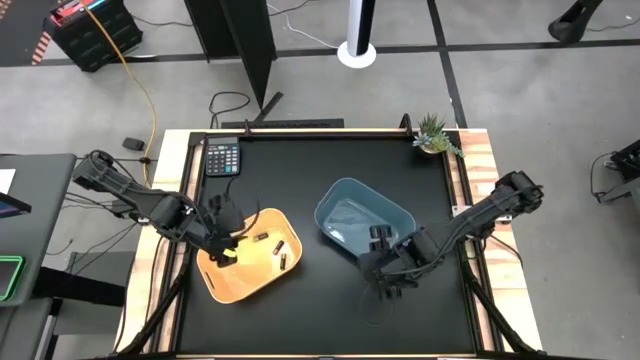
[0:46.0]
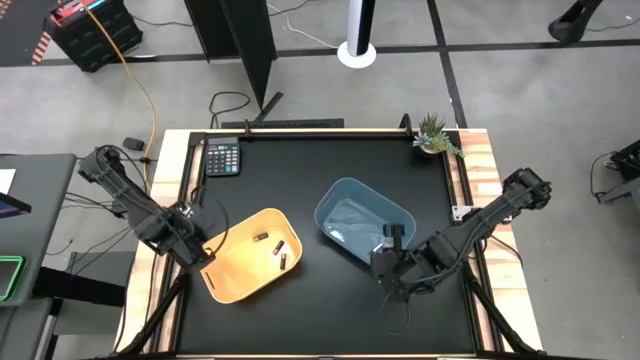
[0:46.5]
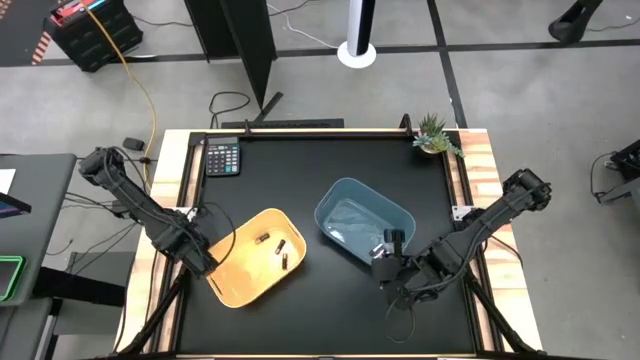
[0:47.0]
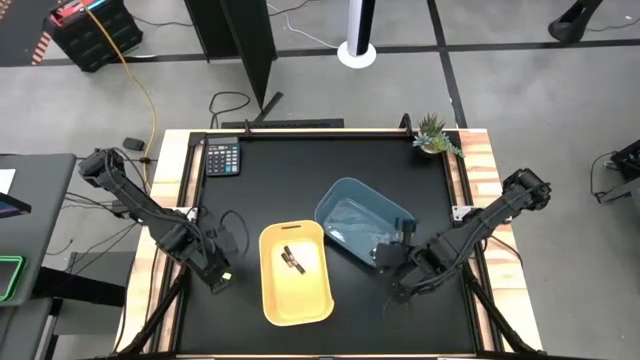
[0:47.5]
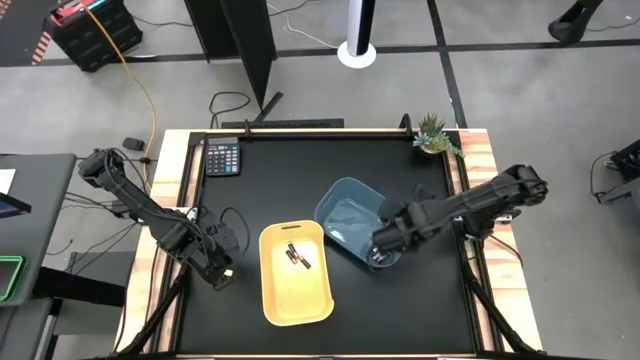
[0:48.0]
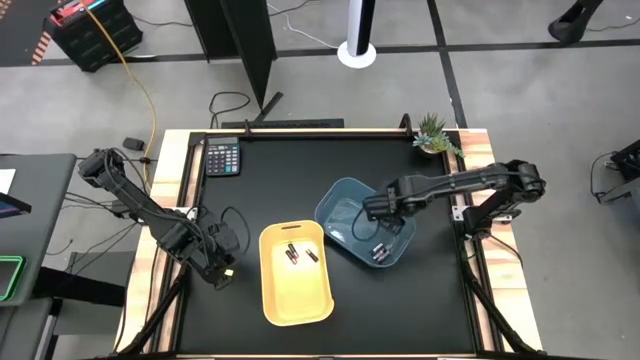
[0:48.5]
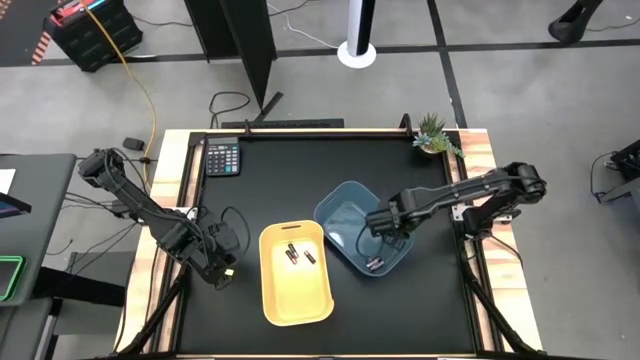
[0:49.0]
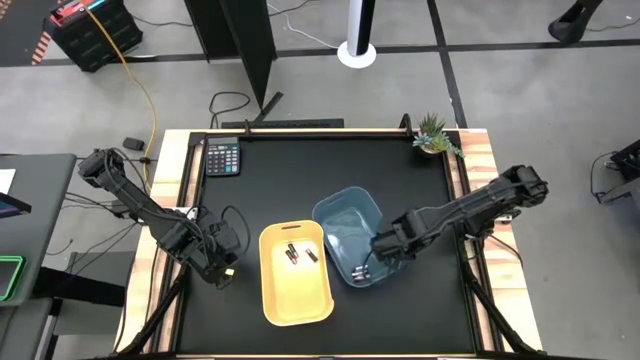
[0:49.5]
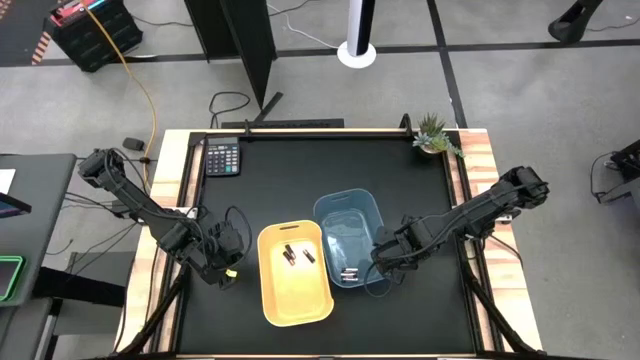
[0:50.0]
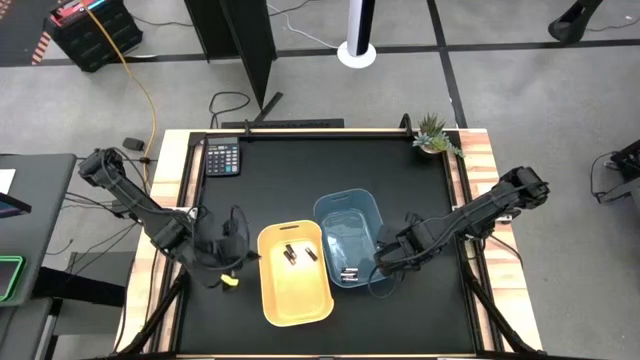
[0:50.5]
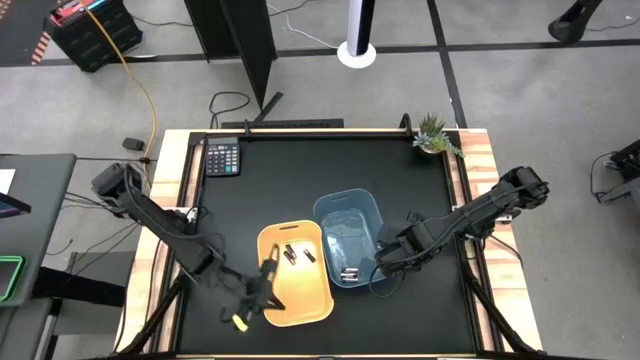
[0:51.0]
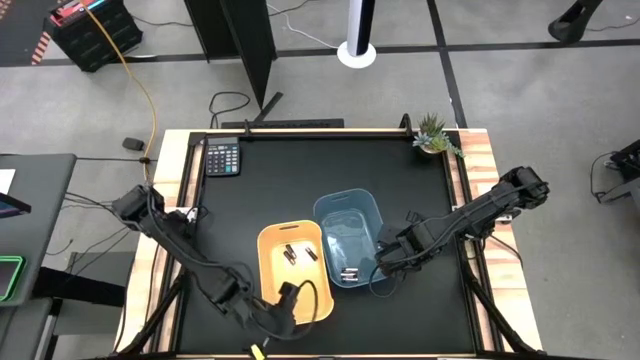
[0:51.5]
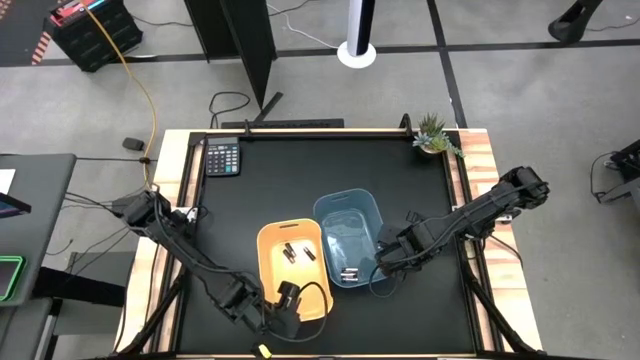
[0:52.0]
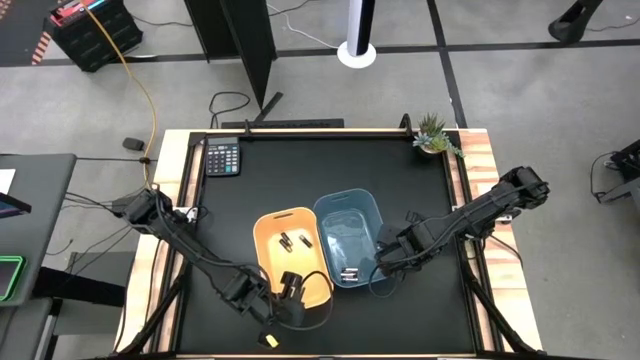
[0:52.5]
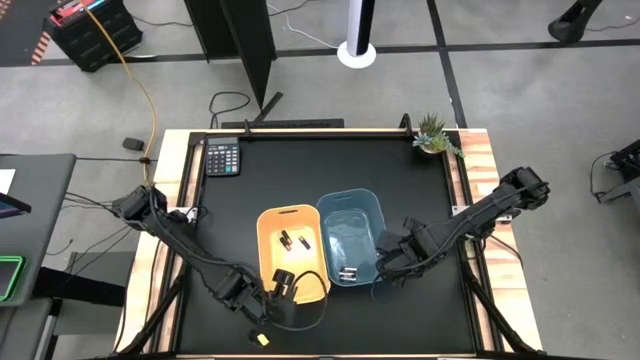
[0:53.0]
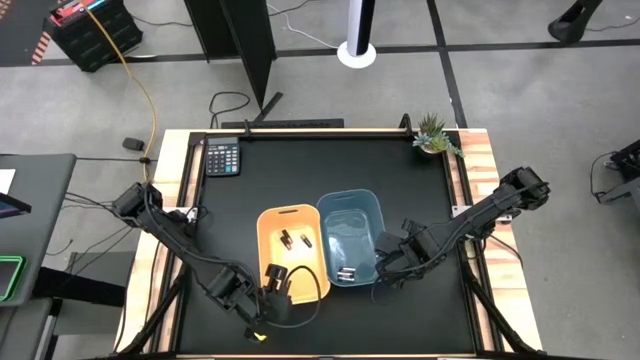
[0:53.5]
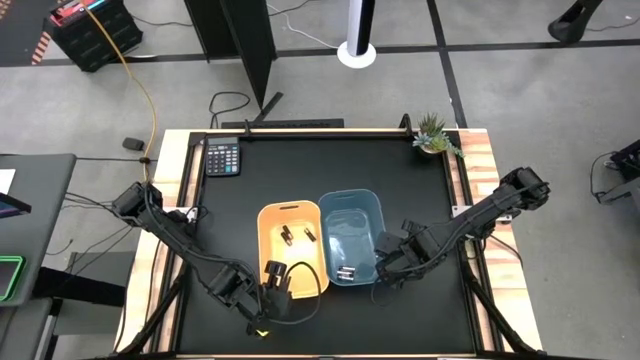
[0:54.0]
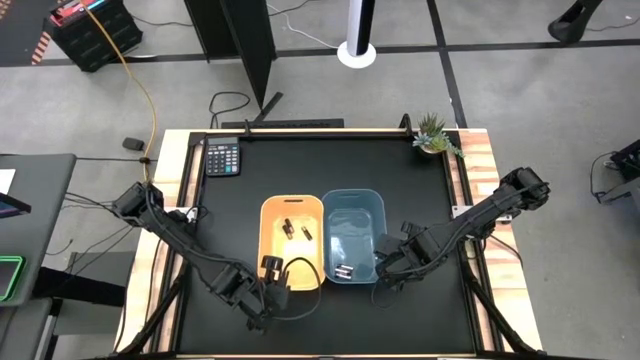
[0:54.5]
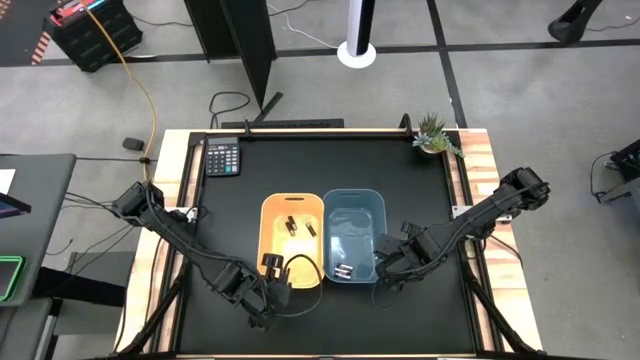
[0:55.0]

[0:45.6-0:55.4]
Task: Sort batteries
Adjust the bins

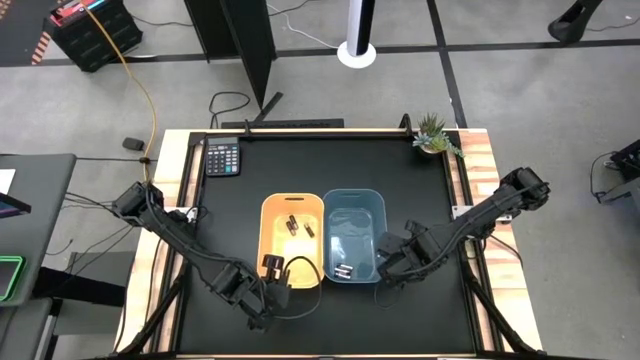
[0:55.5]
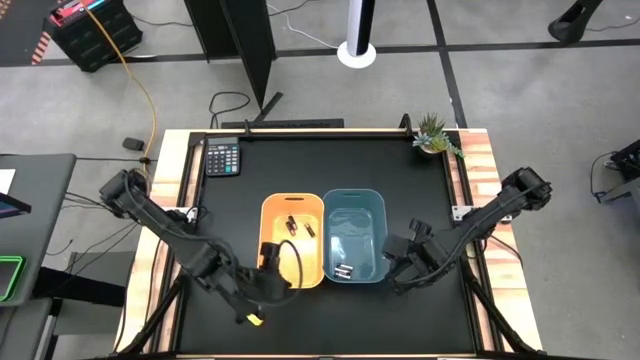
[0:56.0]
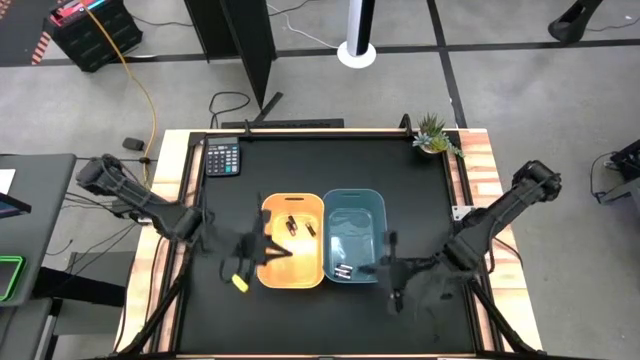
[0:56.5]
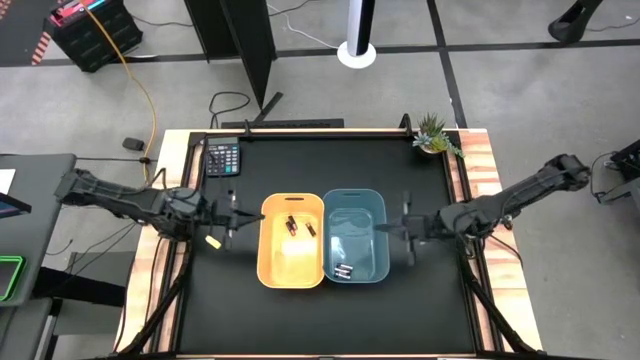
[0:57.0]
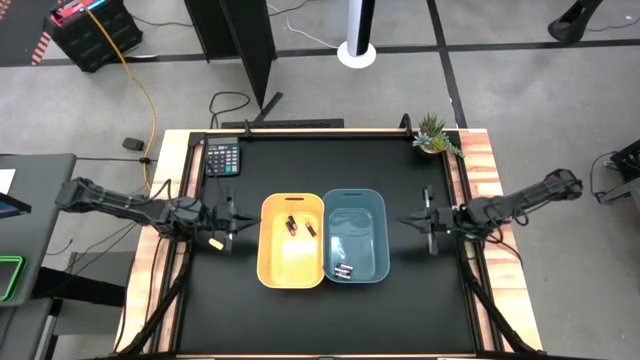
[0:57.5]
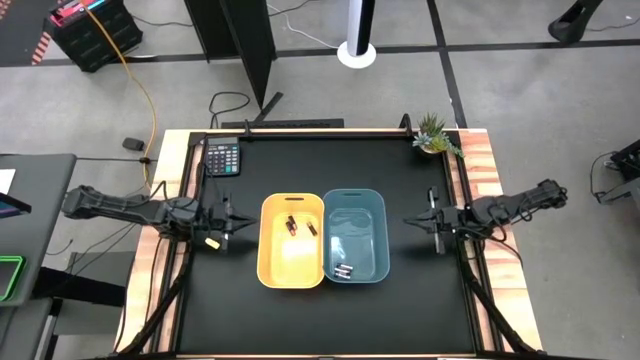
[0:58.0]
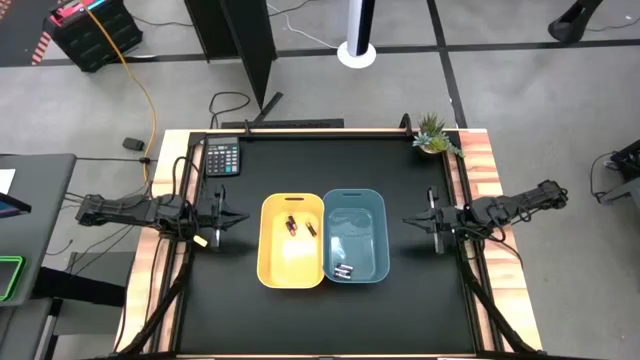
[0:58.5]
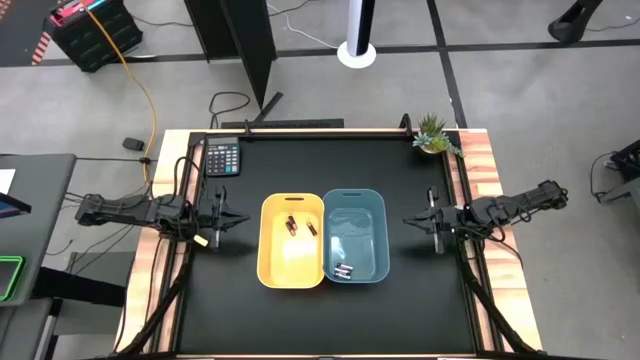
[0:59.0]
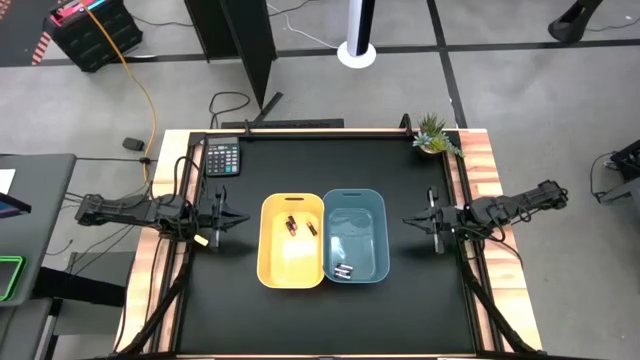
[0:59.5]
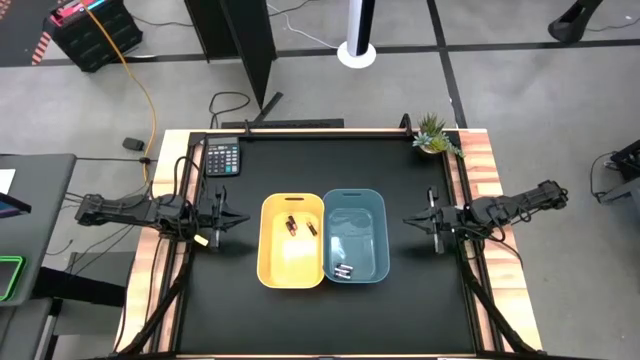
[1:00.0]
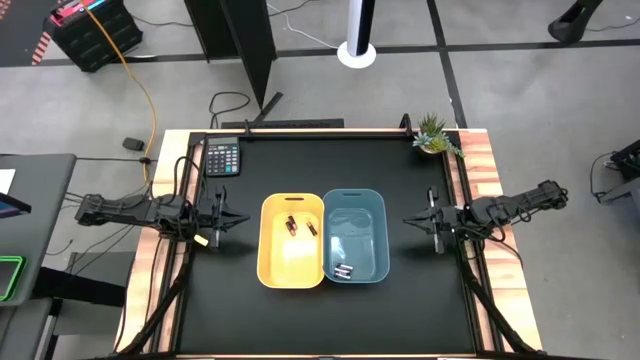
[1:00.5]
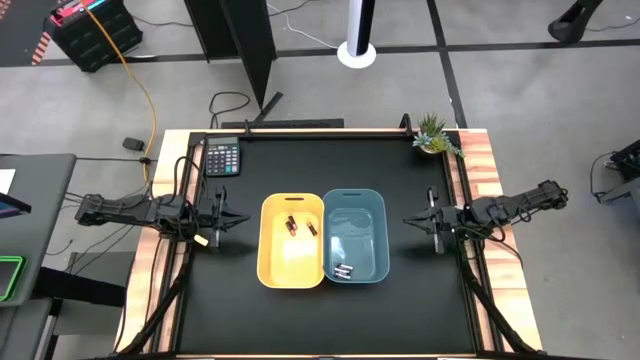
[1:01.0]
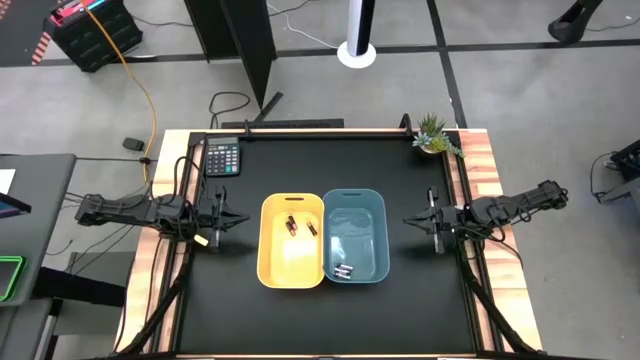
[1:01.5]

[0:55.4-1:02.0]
Return to Home Position

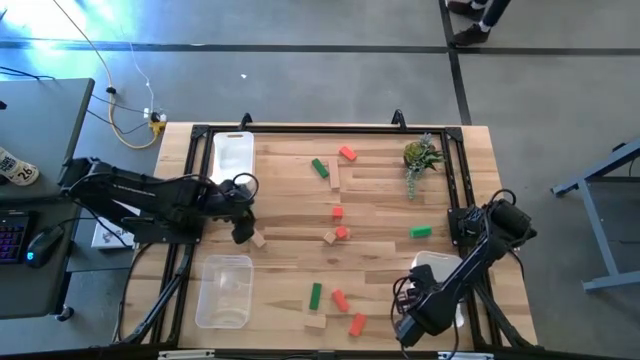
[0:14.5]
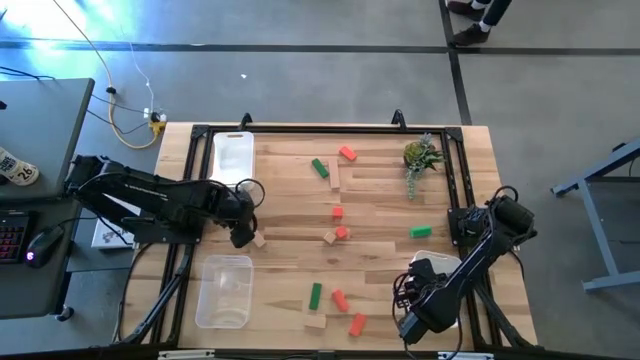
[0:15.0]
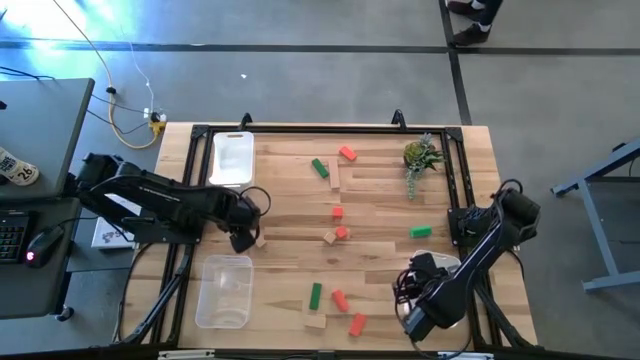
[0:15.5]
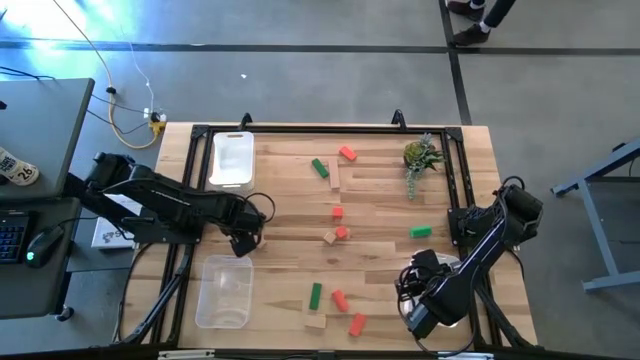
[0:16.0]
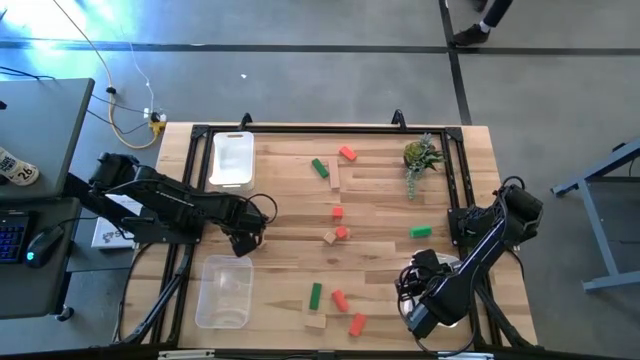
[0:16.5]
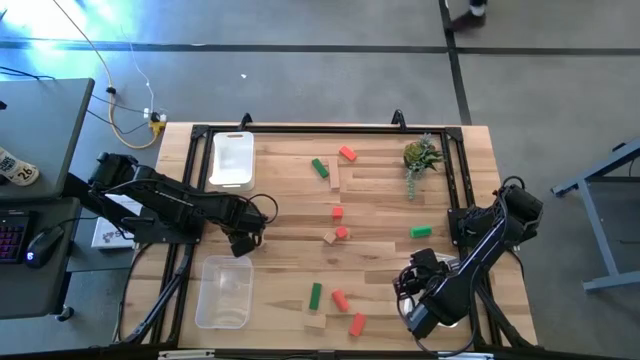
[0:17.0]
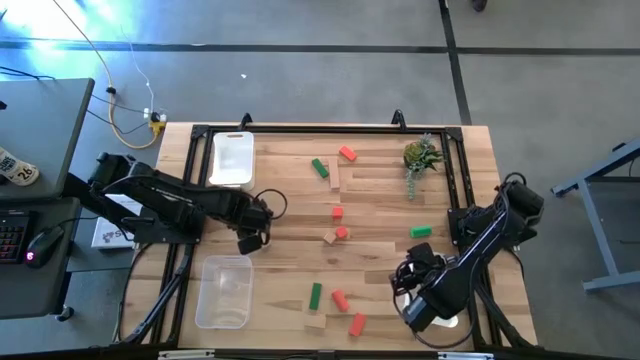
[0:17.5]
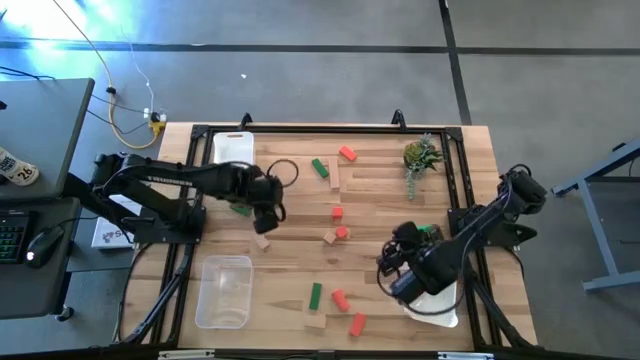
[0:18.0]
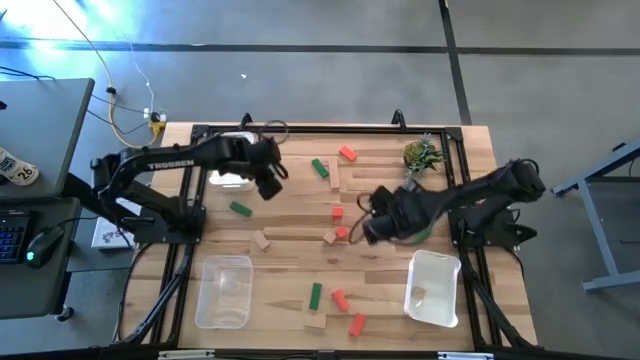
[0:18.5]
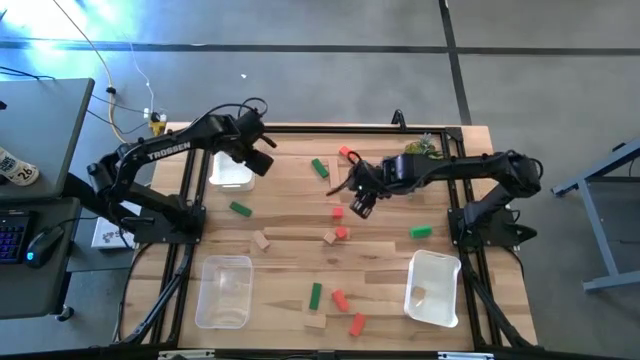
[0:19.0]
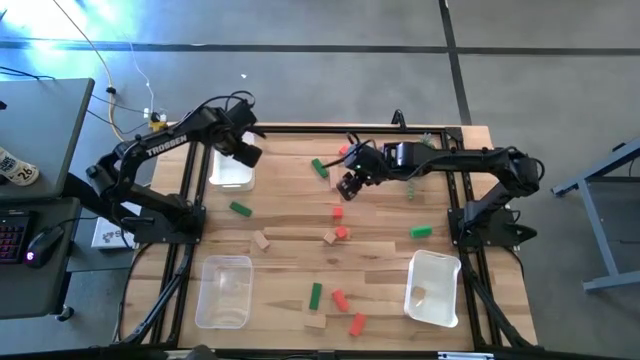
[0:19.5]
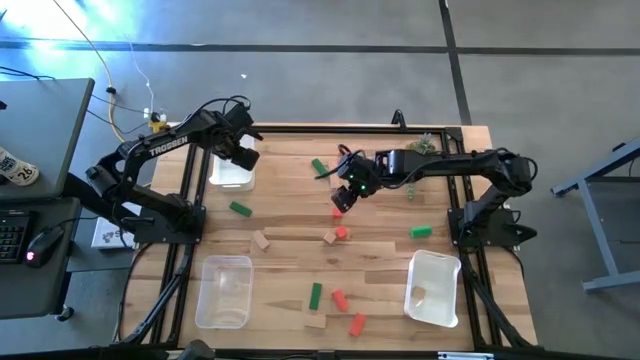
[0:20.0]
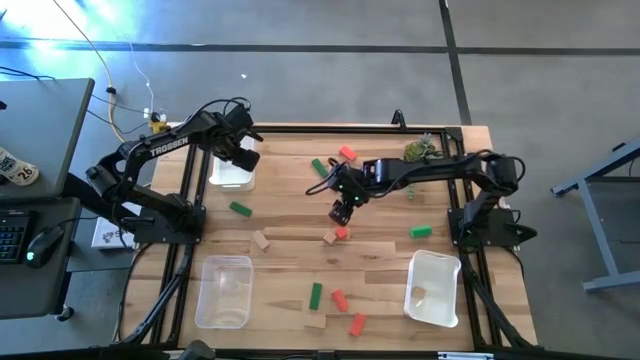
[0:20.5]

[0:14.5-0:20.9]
Task: Sort & place blocks by color
Put the green block into the top white bin
